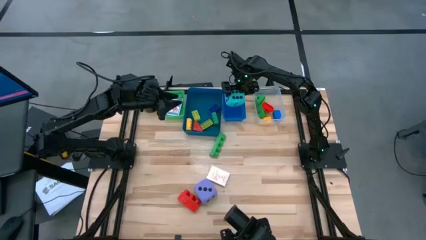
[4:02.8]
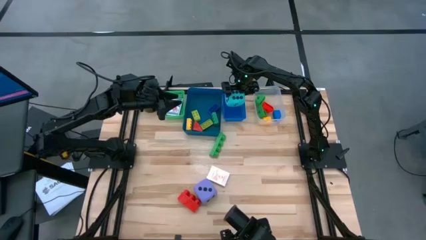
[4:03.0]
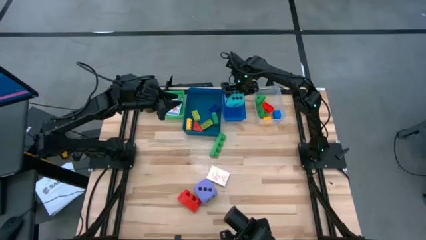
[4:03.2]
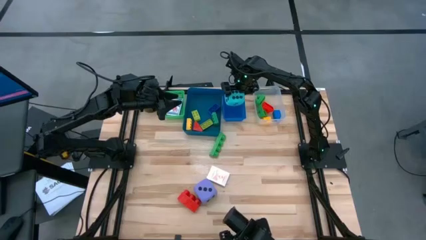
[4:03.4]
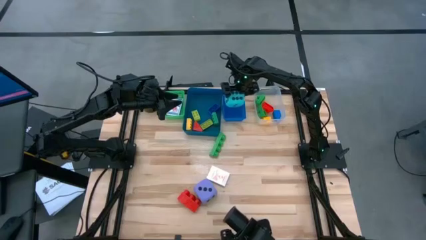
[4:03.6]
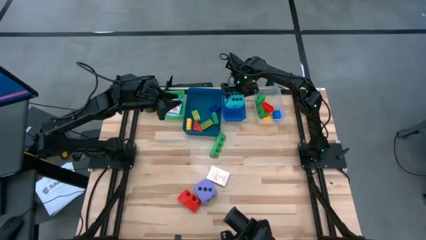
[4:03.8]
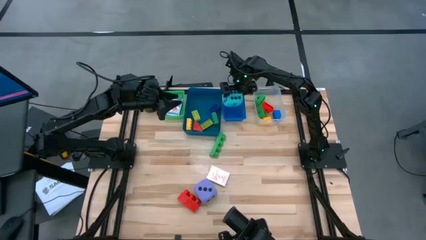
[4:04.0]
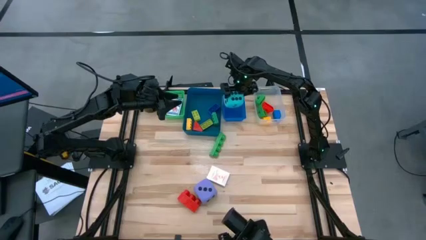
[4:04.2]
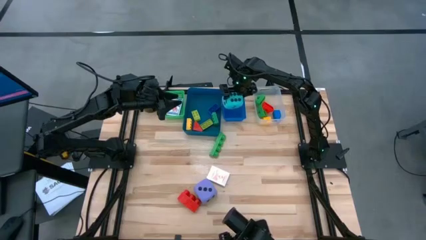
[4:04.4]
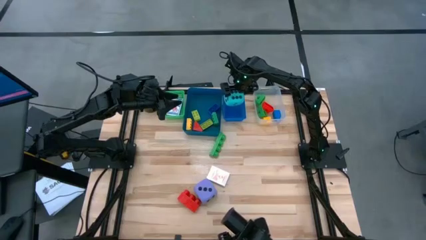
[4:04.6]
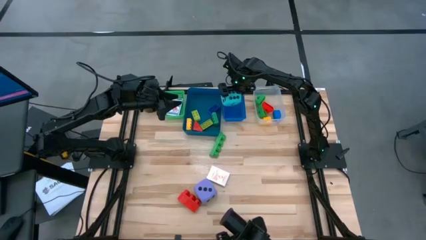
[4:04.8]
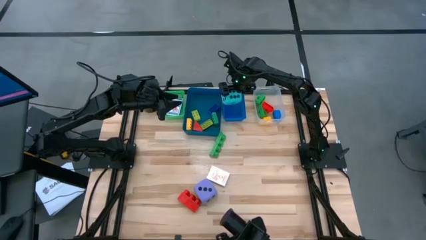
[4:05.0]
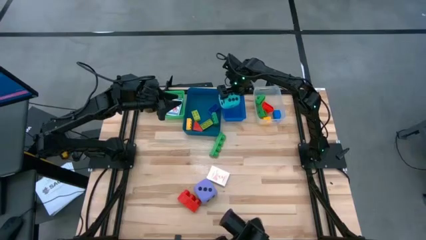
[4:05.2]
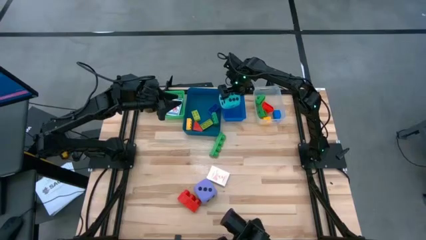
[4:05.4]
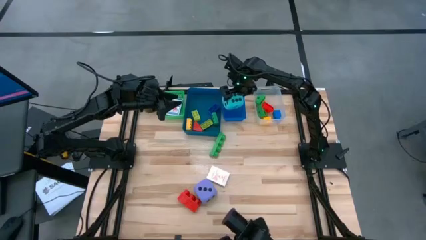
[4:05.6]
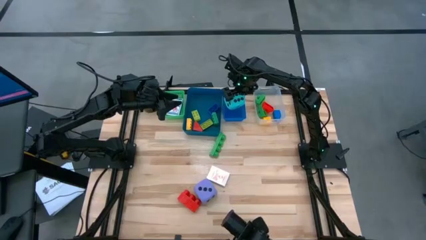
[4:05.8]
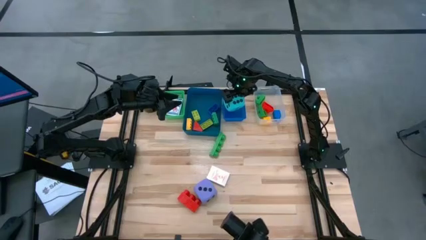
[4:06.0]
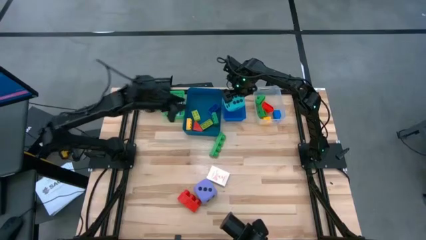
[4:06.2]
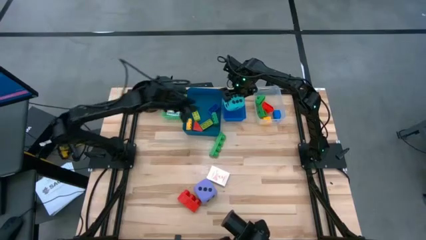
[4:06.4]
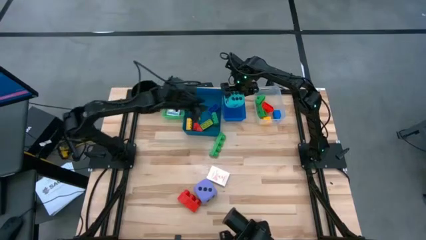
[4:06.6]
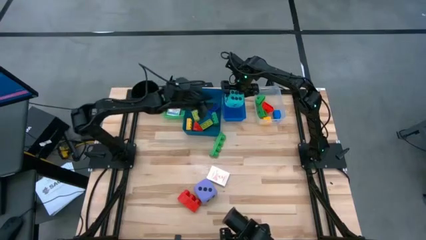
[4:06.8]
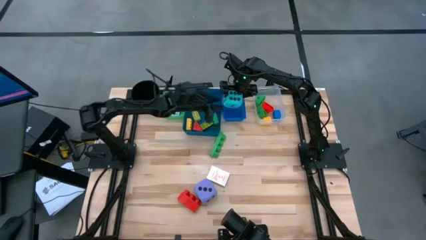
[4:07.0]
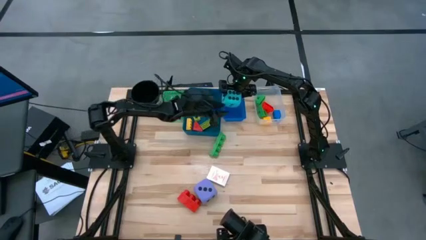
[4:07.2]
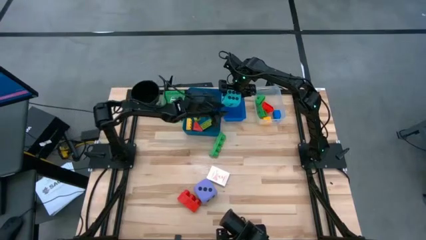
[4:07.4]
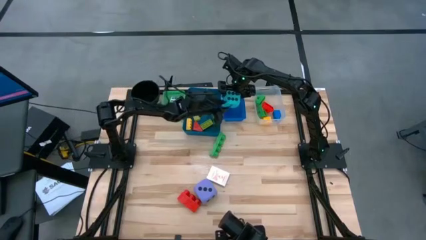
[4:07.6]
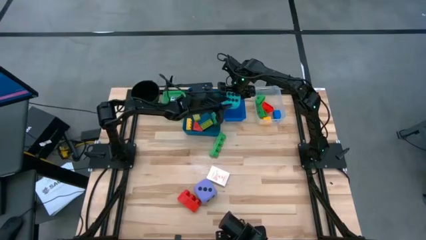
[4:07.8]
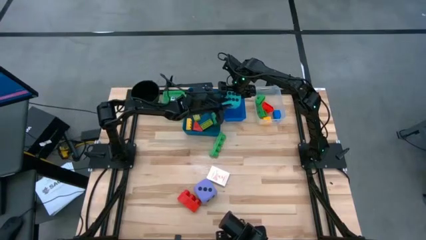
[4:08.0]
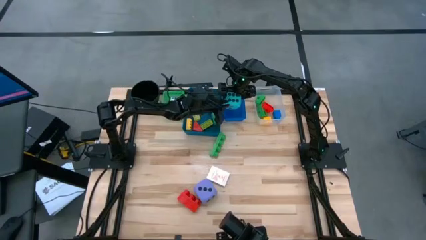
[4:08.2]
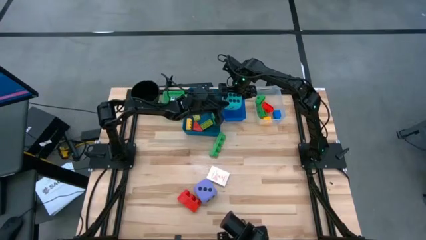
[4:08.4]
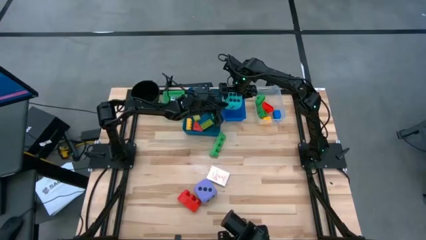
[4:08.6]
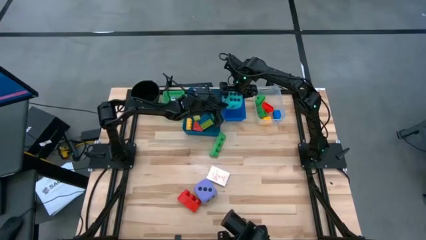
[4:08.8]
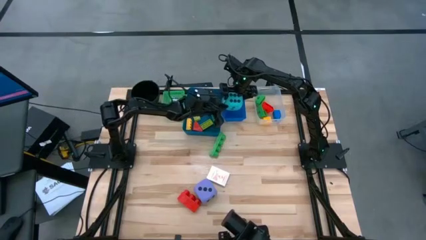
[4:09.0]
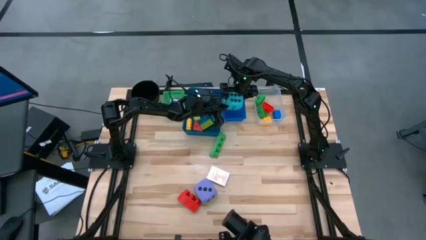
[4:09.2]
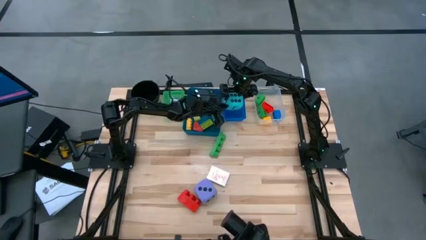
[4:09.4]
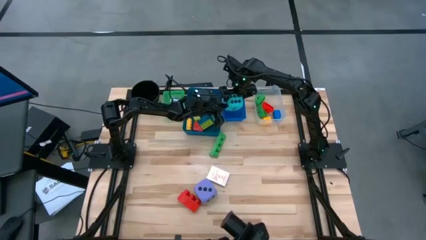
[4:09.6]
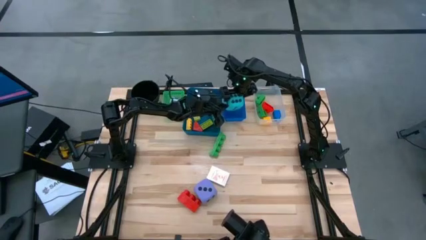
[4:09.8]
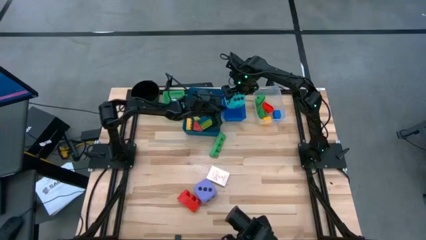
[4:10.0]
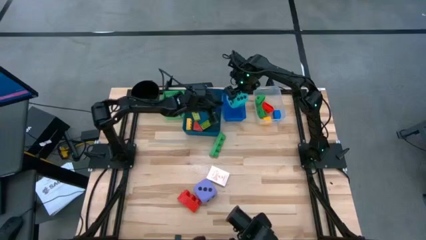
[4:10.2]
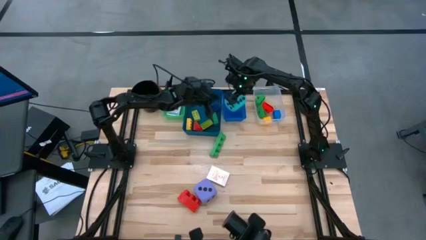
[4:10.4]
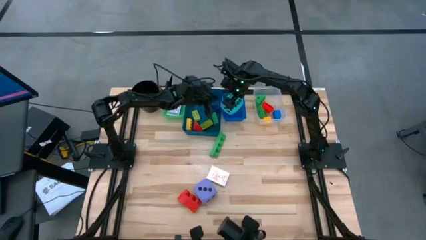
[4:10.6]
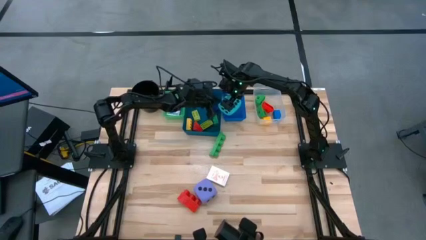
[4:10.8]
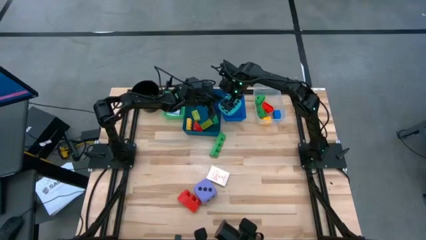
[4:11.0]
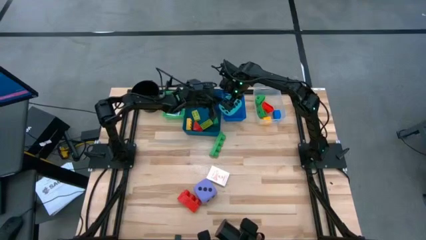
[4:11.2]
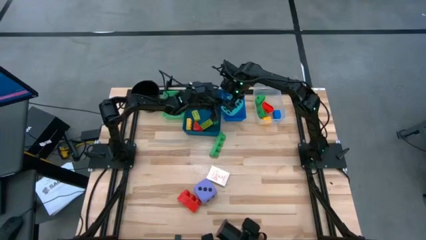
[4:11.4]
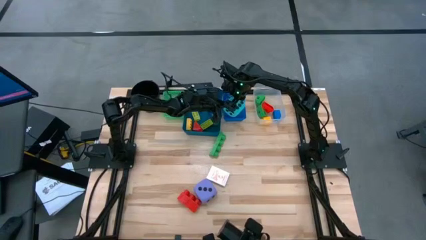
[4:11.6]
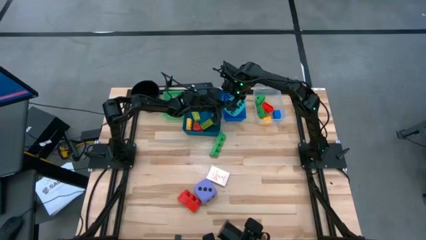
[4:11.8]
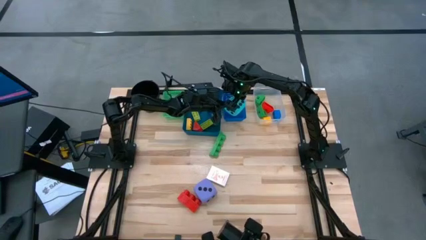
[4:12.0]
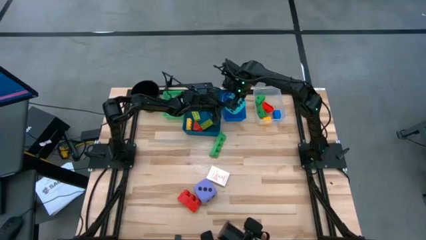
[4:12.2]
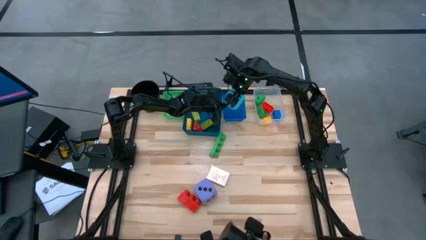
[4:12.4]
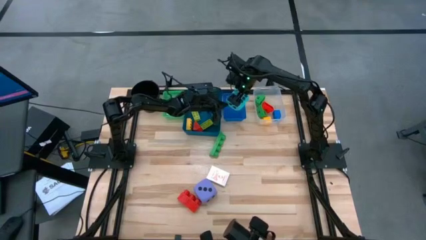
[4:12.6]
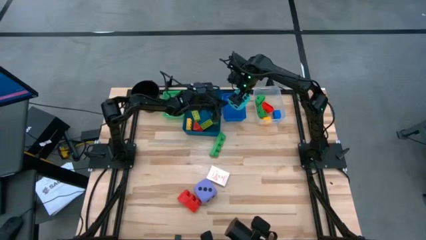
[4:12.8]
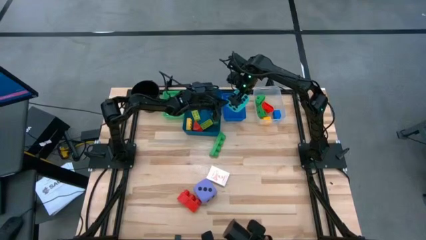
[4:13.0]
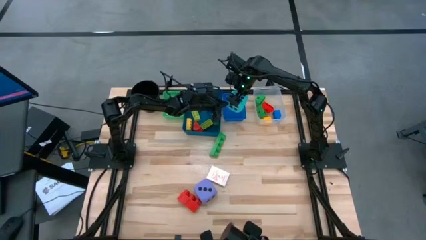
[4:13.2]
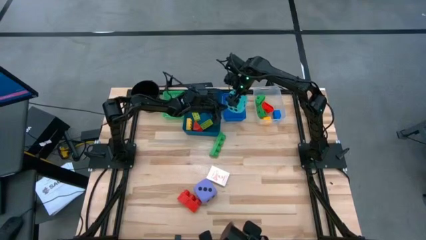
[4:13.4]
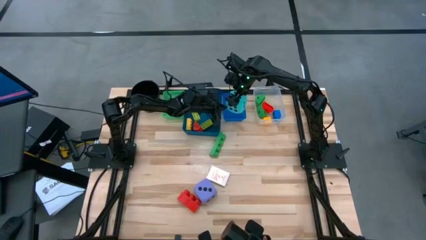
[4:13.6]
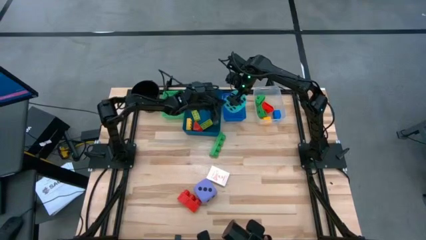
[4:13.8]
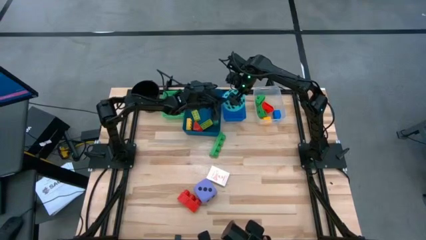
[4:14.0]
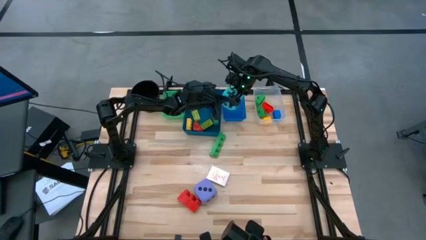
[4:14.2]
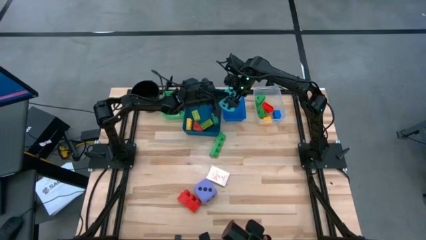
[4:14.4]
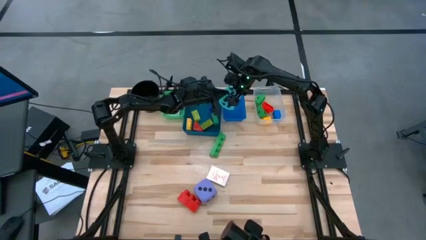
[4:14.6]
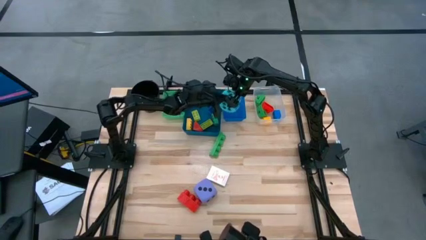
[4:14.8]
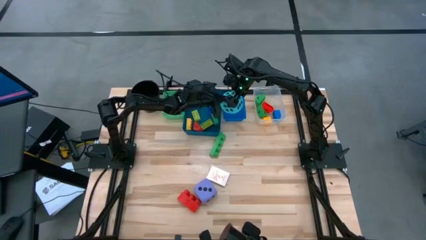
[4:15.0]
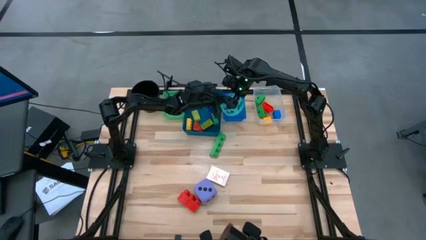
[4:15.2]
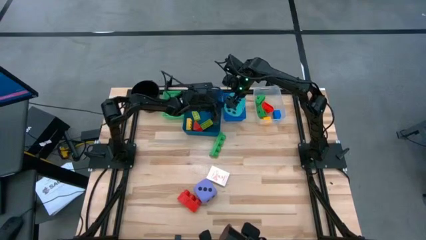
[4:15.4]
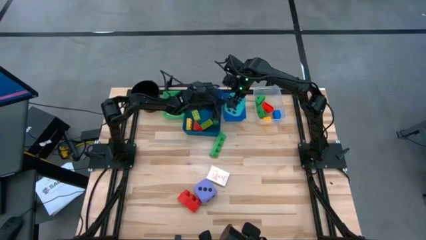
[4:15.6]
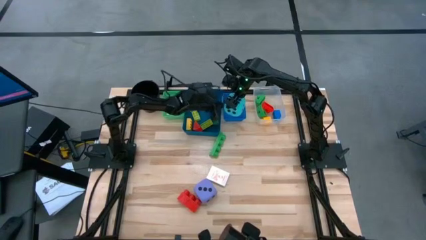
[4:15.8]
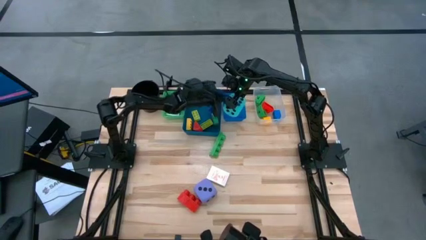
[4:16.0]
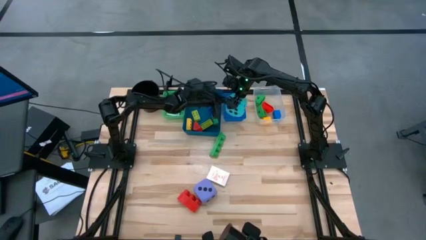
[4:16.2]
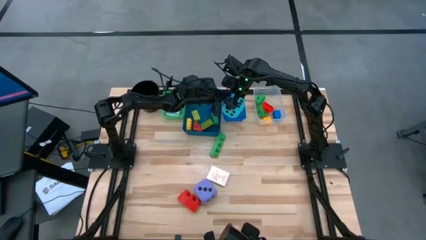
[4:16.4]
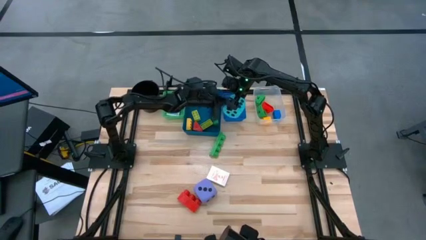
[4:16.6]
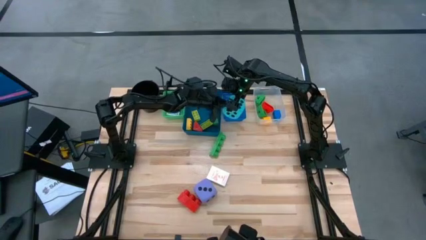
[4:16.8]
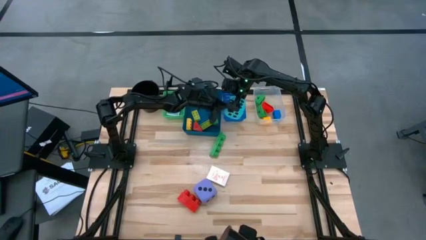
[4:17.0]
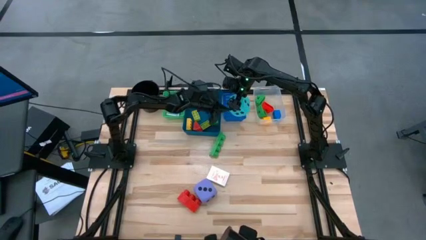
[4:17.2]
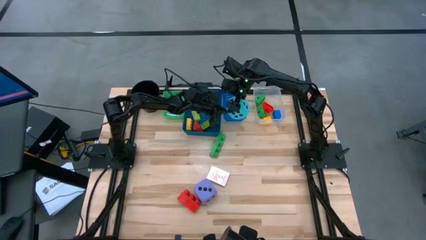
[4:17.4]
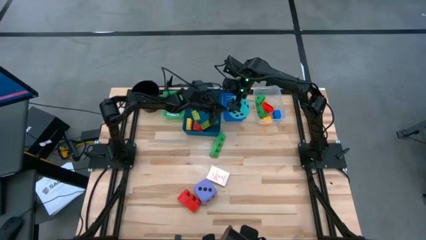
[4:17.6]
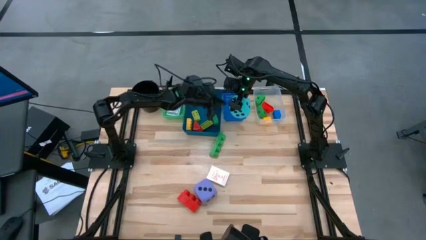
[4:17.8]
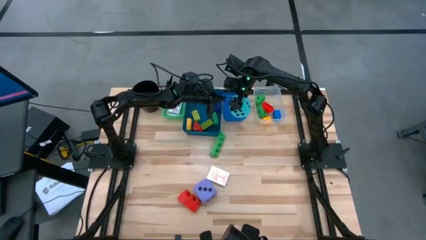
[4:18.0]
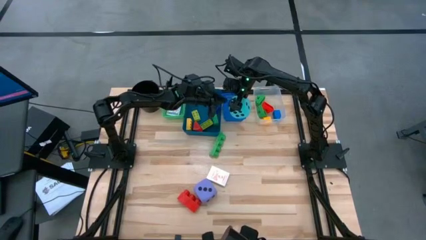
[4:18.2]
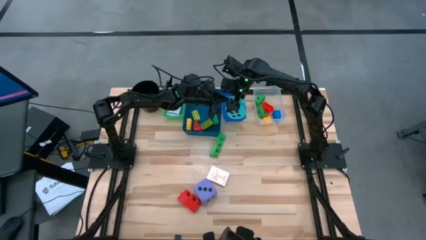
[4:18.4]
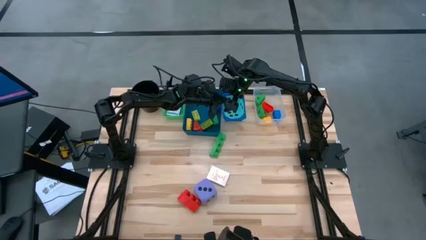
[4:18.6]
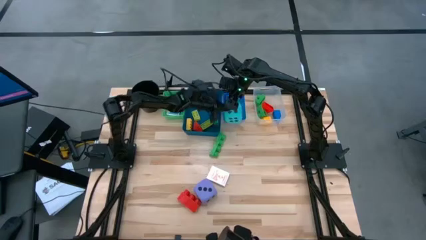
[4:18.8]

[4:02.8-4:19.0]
Task: Pick & Place Toys
Put the blue dice into the blue bin
